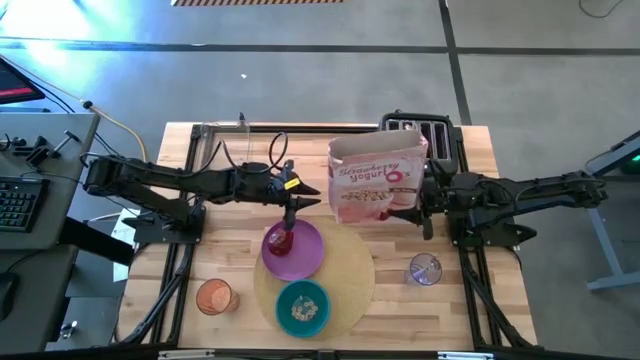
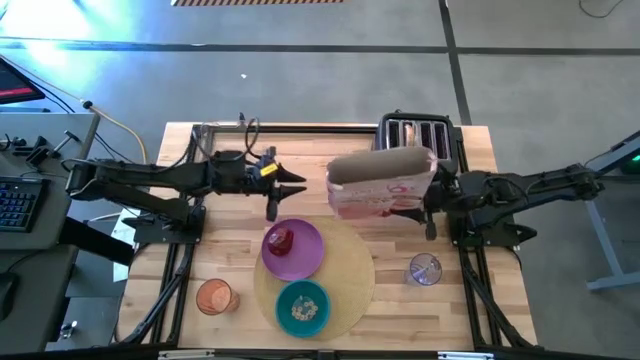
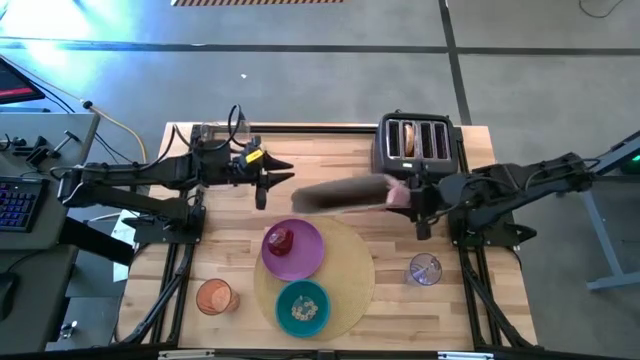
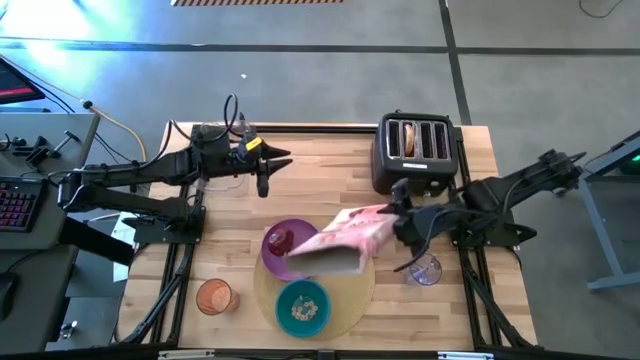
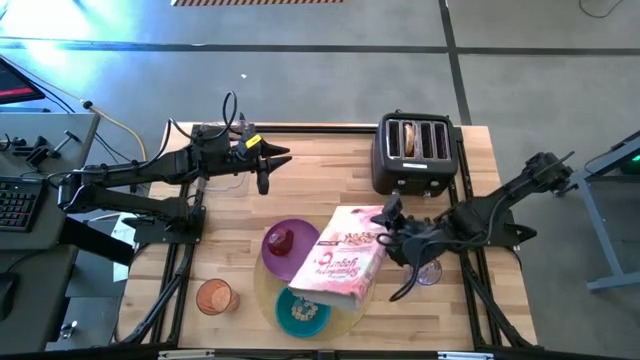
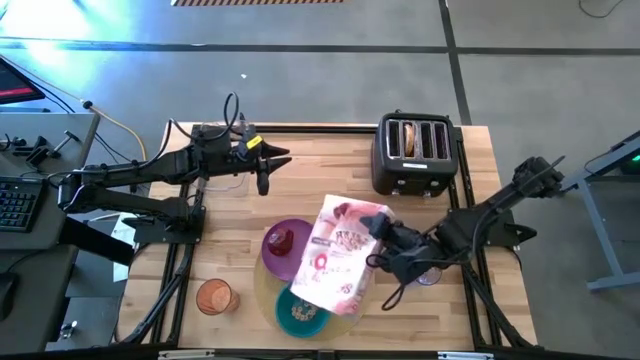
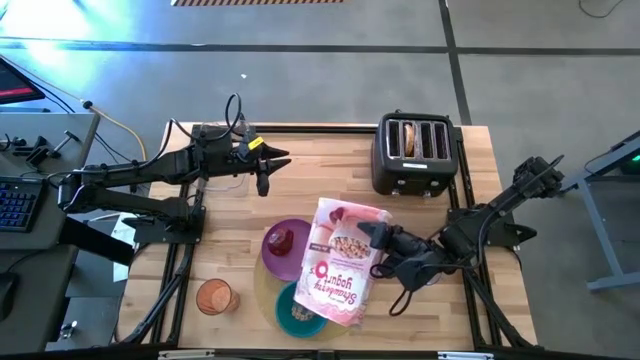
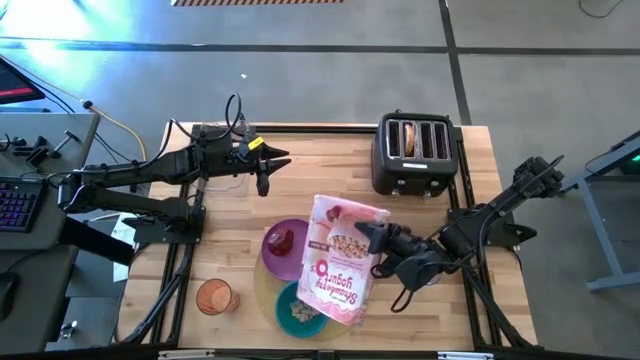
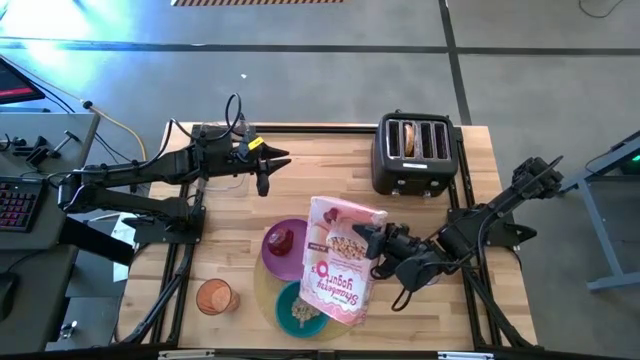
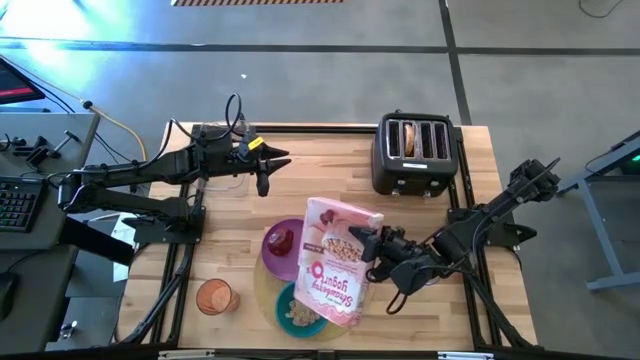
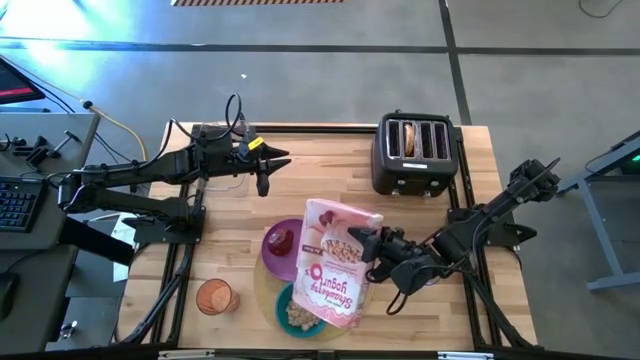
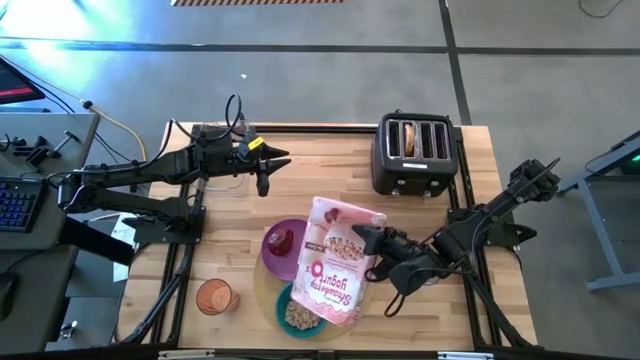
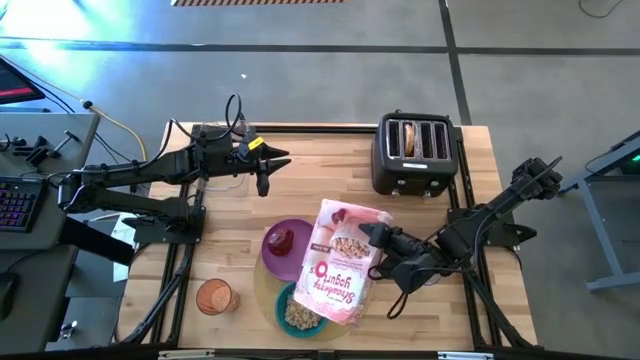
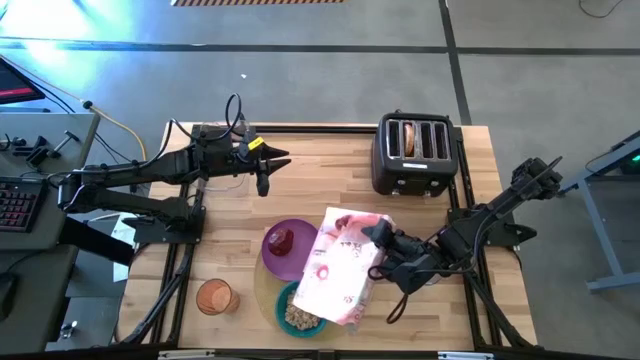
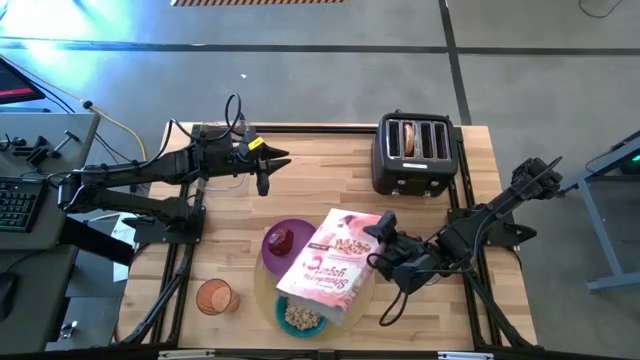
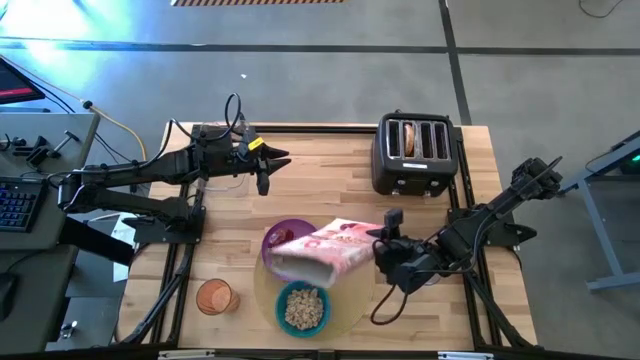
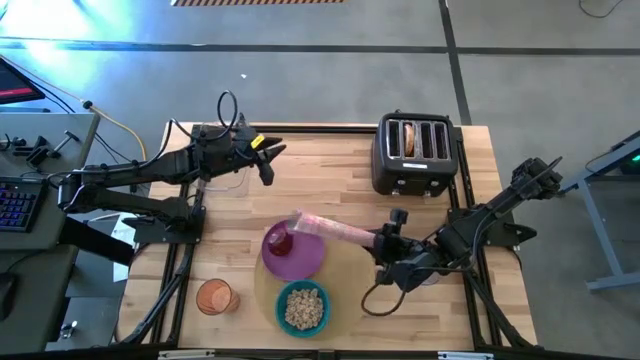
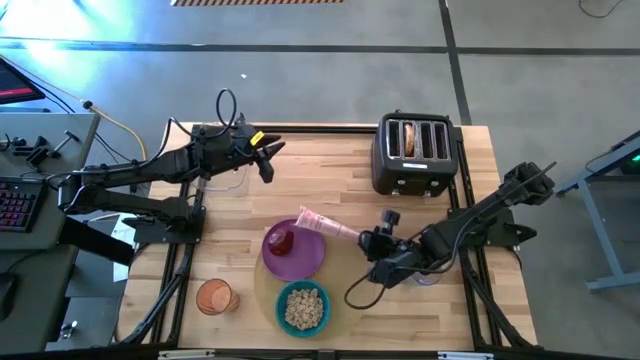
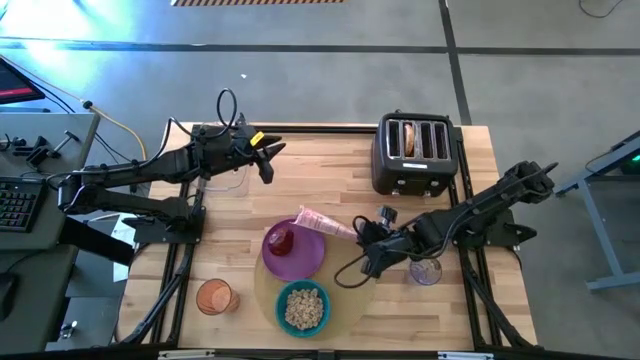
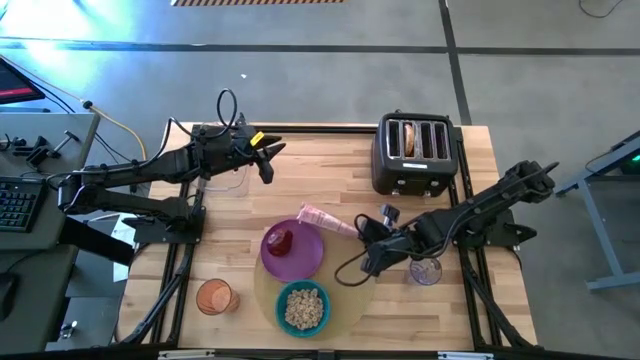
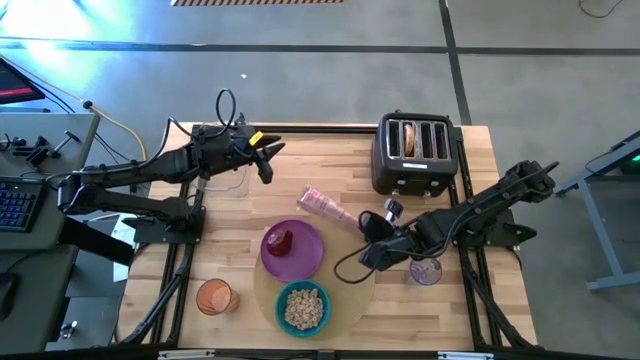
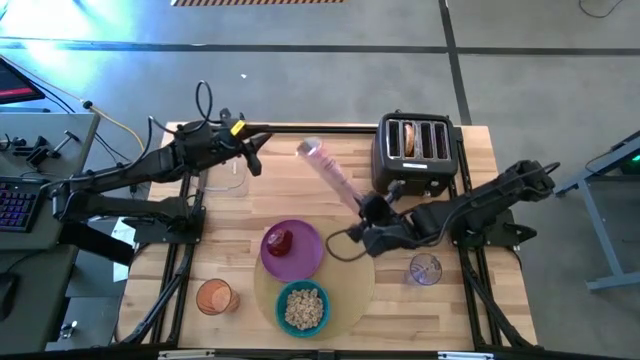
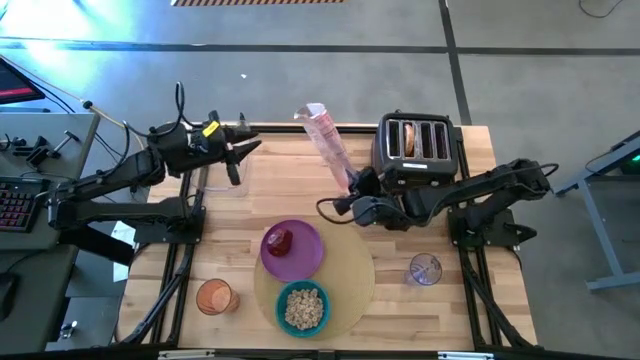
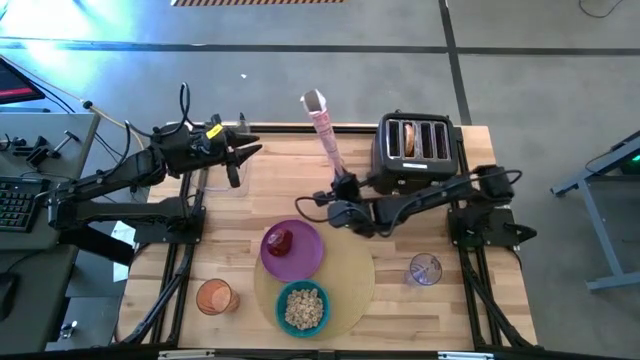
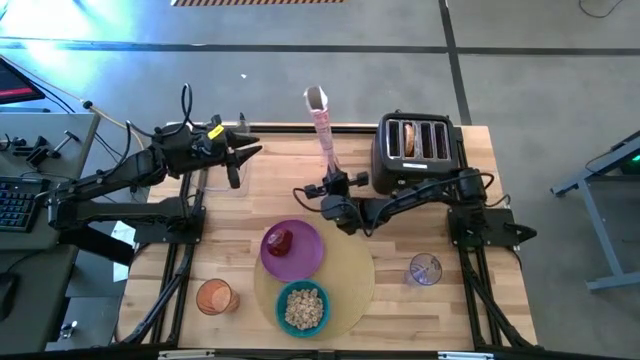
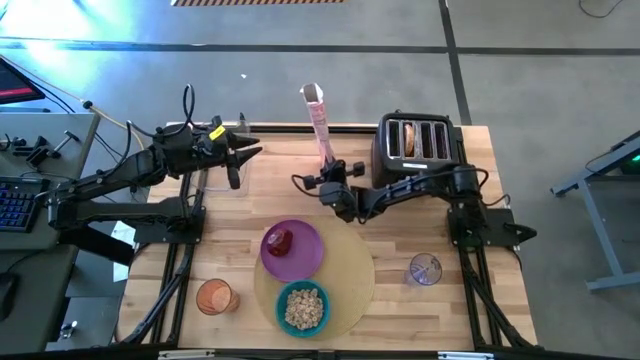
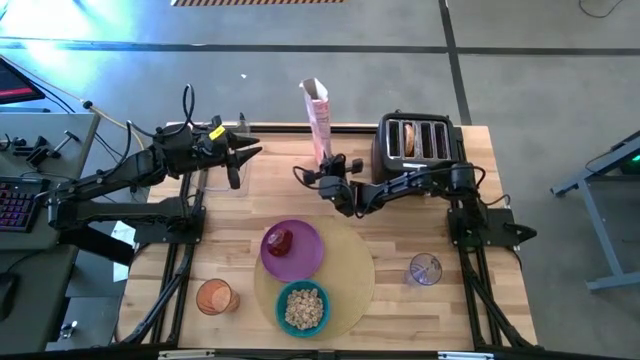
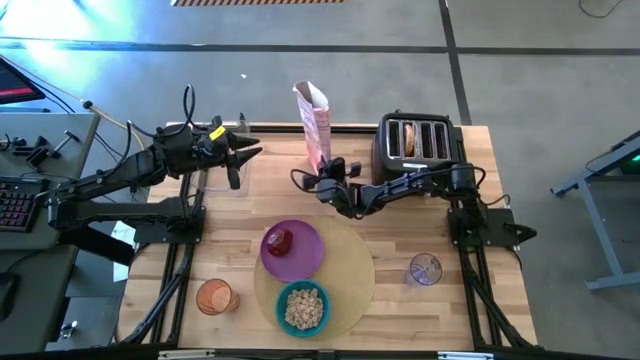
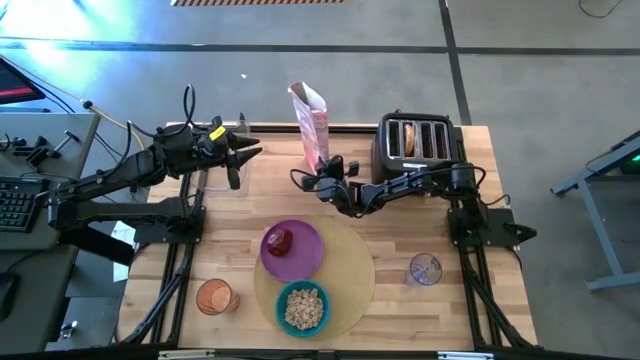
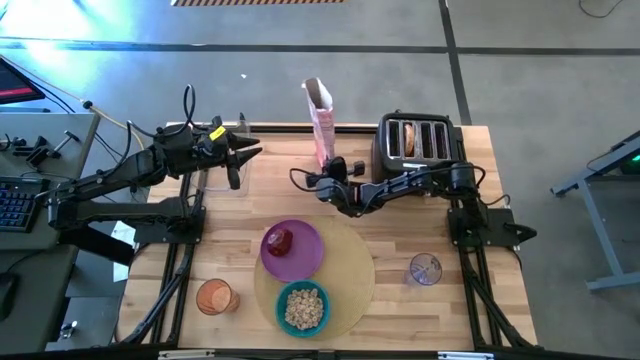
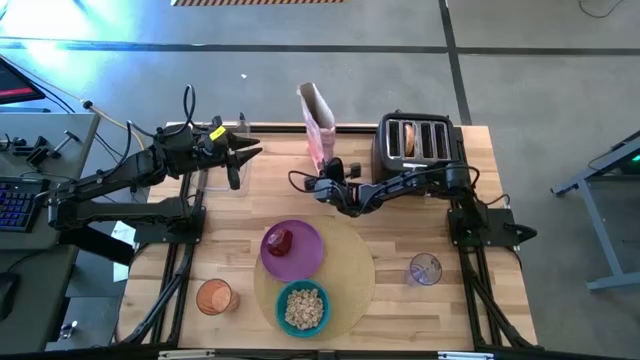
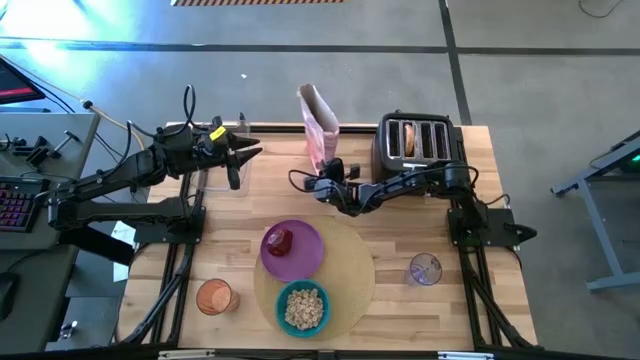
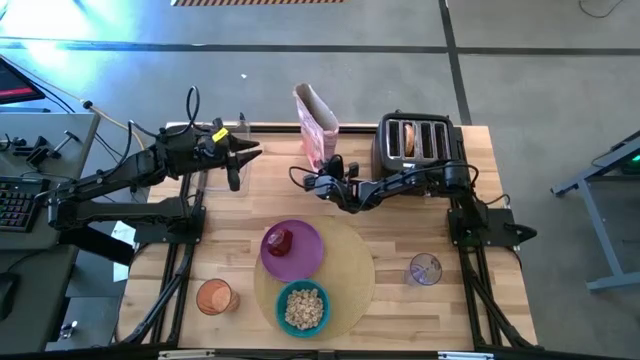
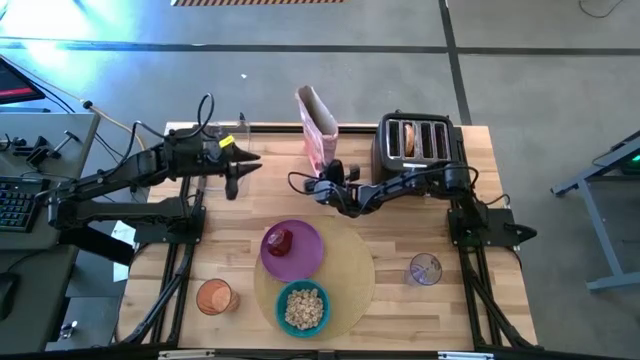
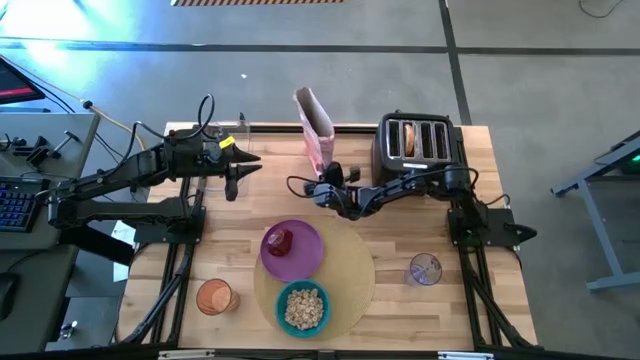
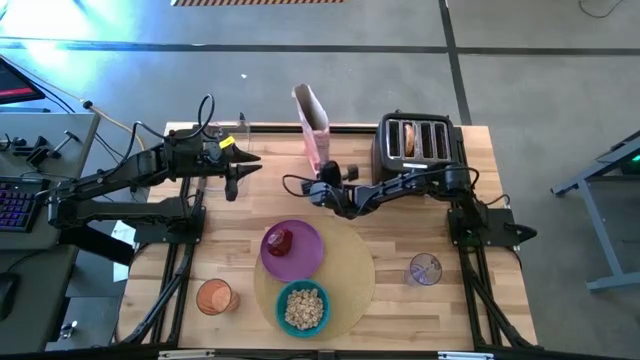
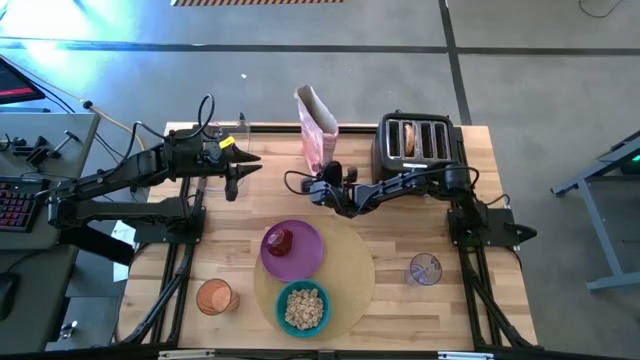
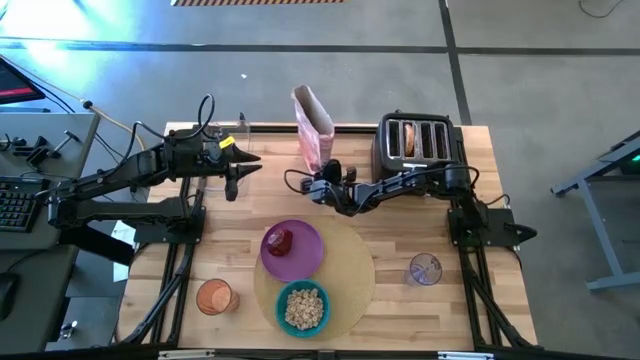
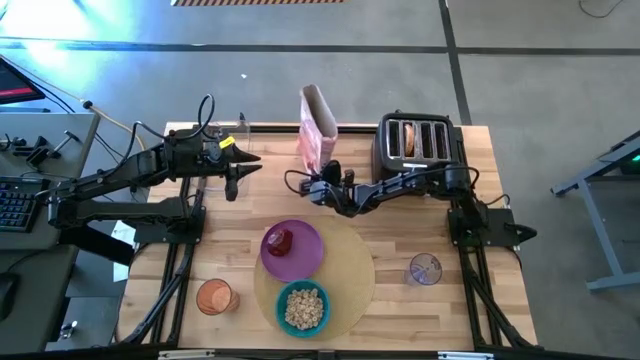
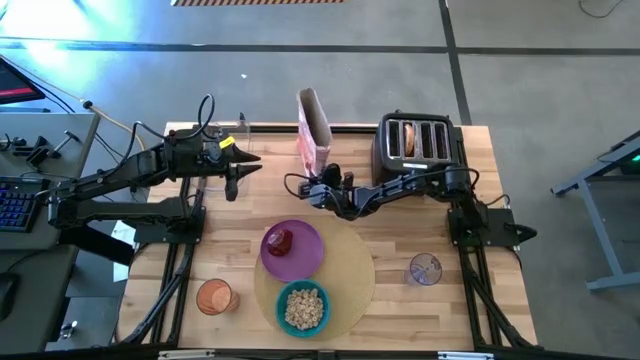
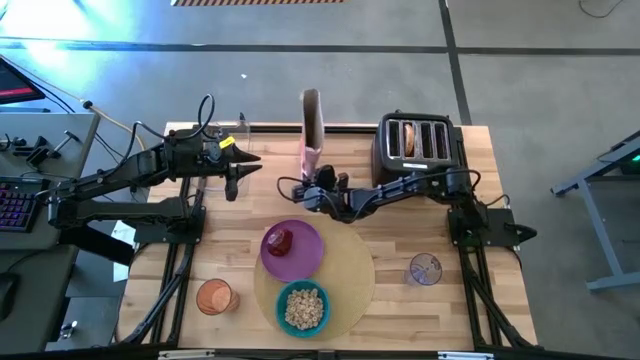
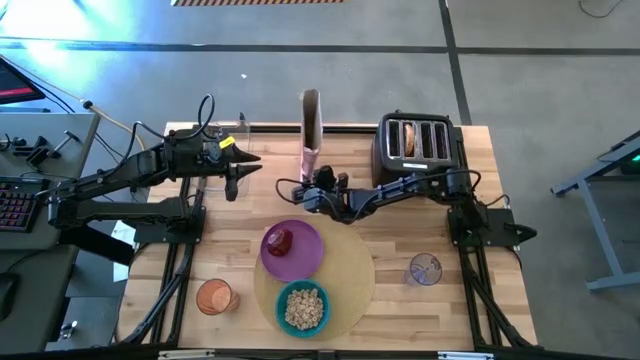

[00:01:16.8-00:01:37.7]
Task: Arrange a breakfast setting
Pour the cereal from the red cereal box into the blue bowl
